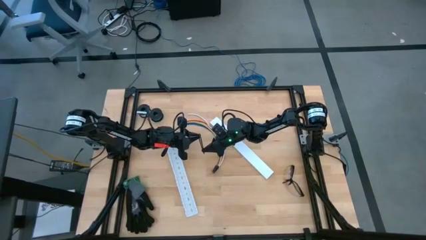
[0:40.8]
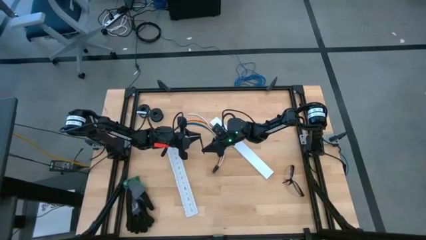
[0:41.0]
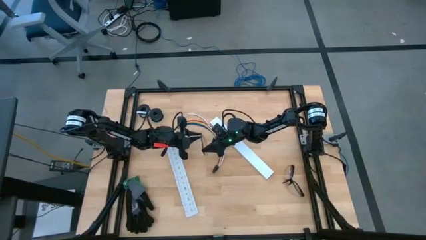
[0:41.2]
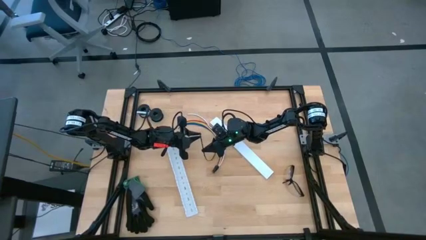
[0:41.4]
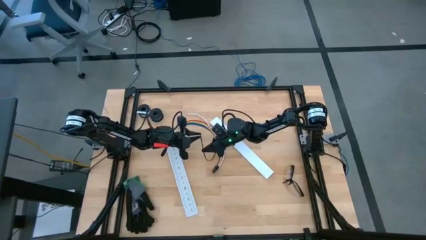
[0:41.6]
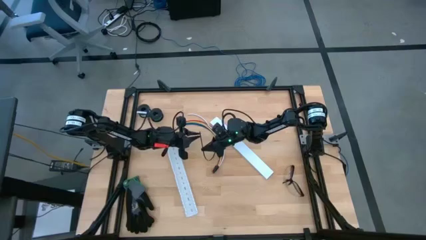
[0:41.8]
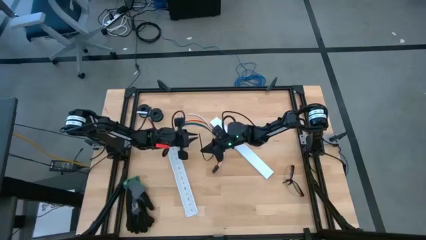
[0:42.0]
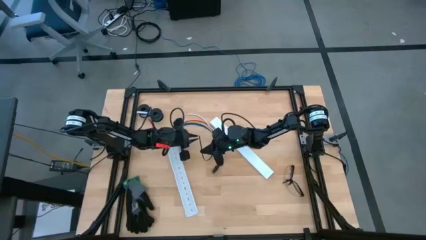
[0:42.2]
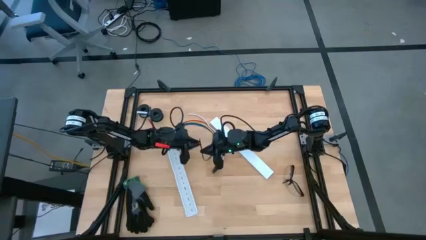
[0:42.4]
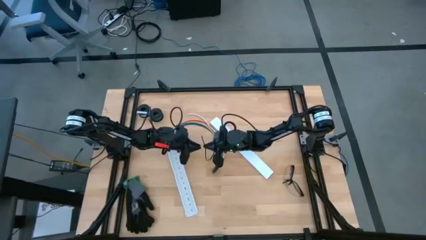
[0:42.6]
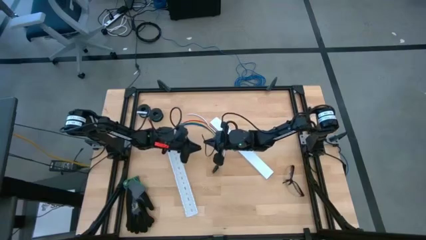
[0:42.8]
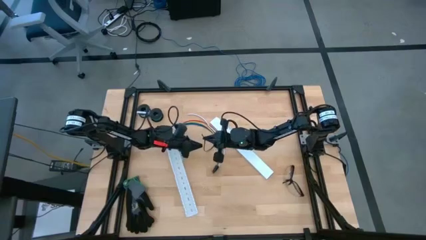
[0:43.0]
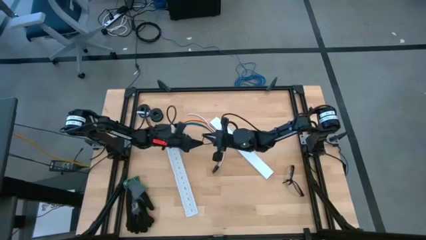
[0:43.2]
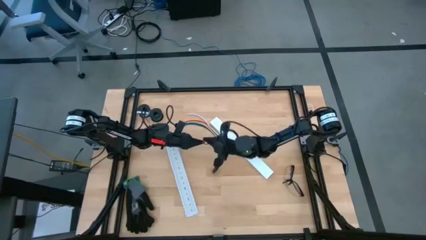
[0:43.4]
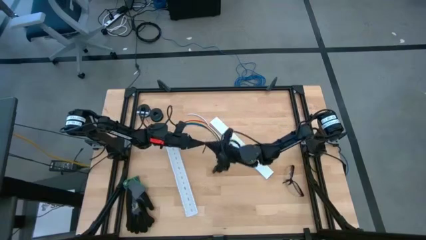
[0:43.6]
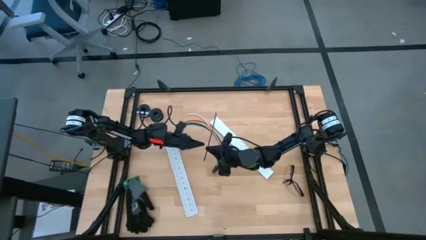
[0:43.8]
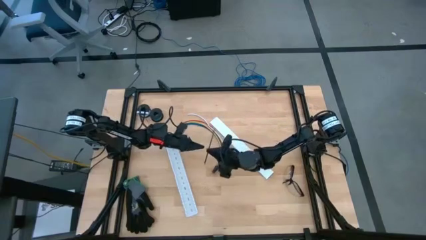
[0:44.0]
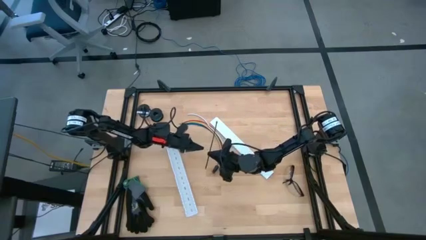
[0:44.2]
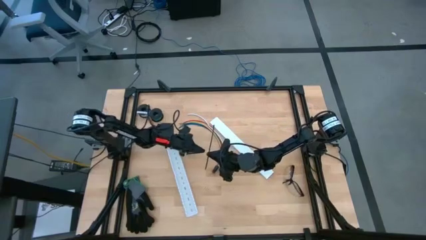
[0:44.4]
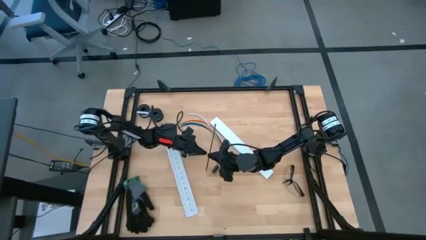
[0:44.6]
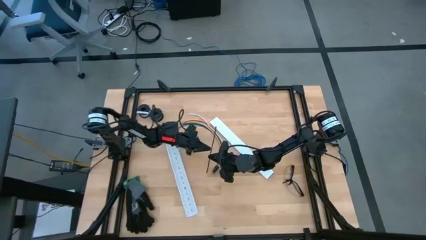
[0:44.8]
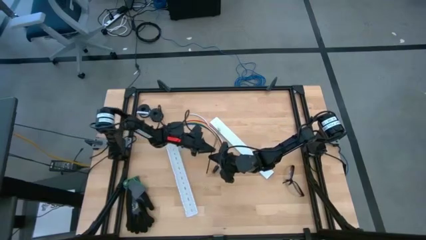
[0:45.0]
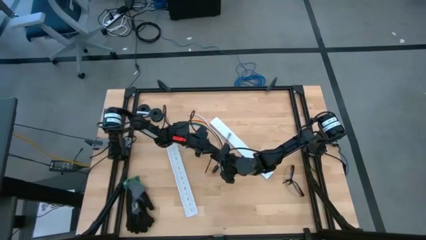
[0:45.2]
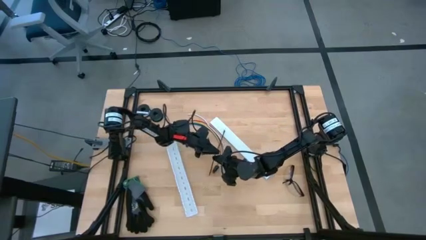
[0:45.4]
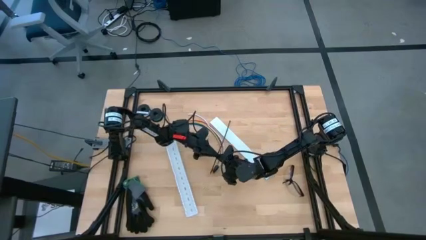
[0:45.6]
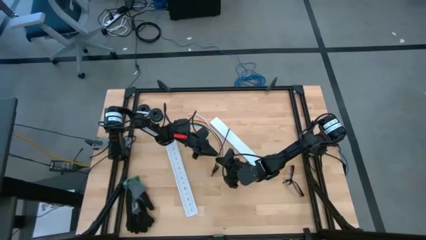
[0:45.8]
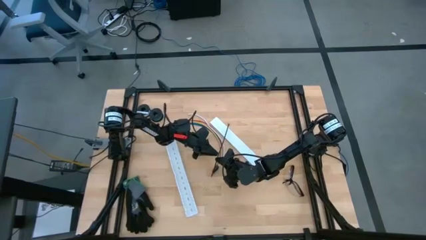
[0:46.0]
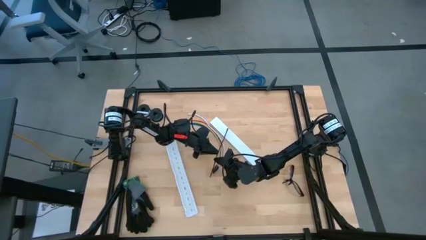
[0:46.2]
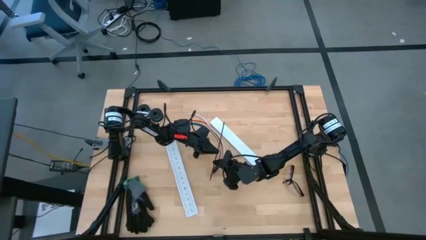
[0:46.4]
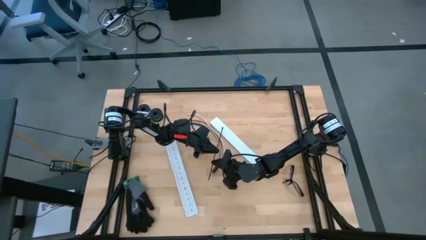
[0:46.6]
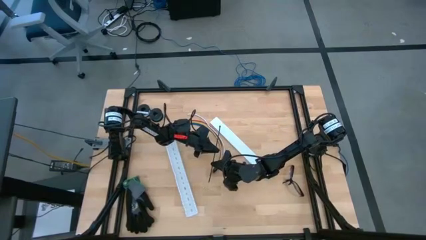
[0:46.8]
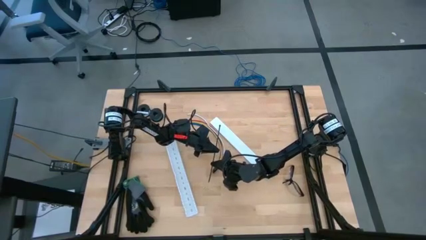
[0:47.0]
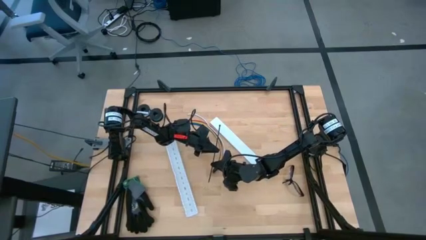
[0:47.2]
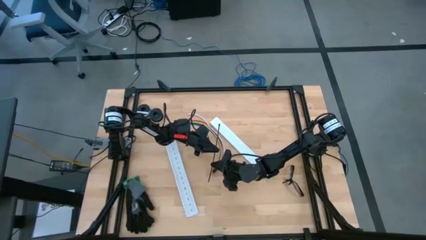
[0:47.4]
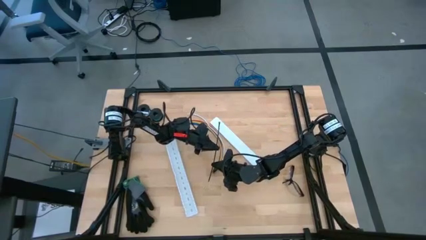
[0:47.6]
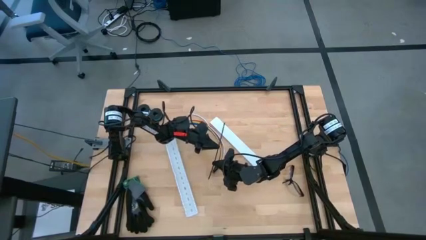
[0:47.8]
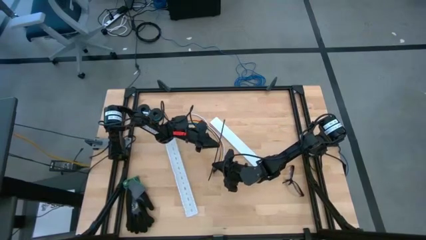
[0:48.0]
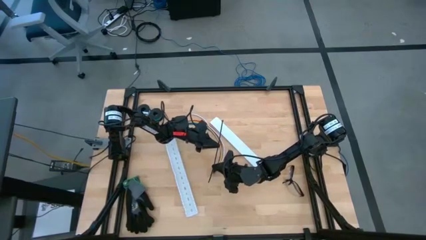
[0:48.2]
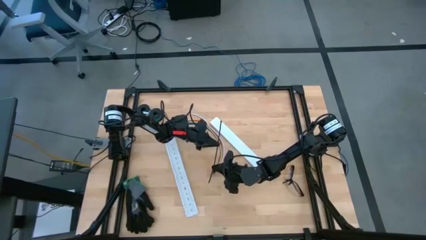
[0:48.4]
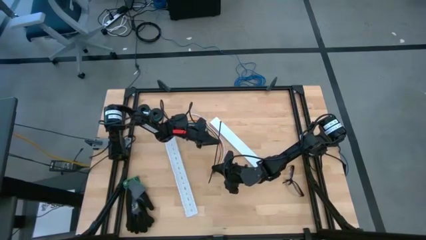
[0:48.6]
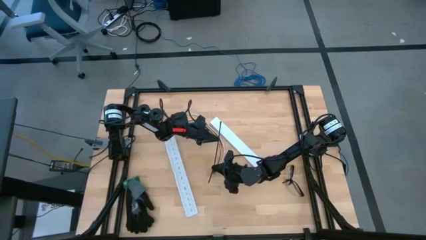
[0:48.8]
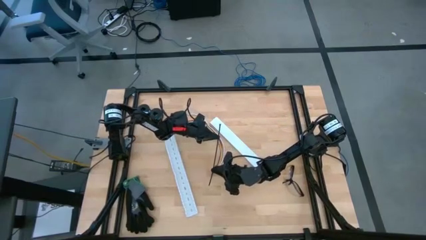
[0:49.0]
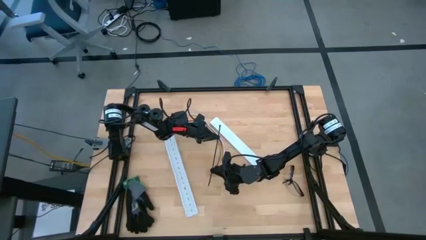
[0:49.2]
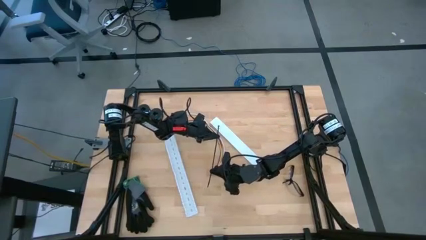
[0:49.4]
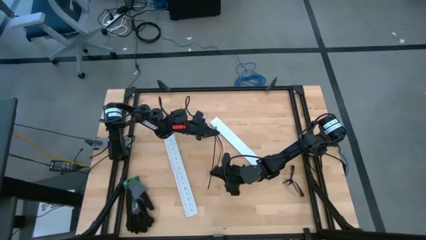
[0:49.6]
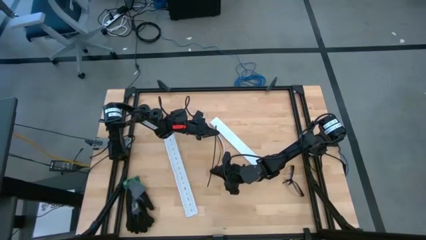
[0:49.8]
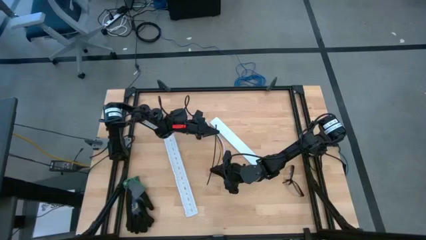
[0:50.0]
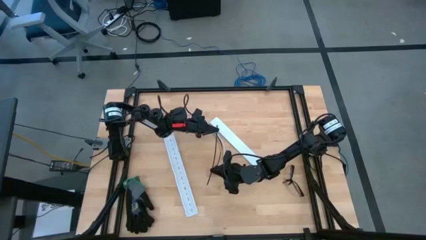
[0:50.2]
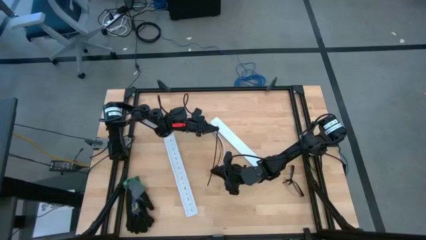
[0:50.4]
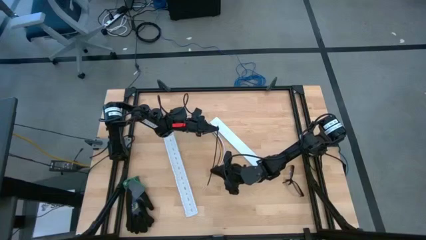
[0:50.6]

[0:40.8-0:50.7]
Task: Ziptie cables
Wrap the cables together using the black zip tie

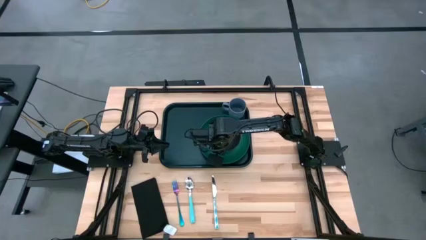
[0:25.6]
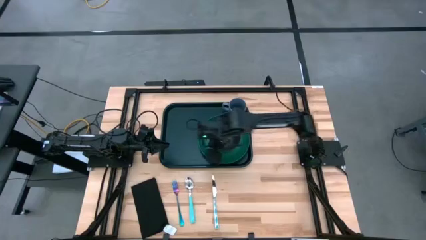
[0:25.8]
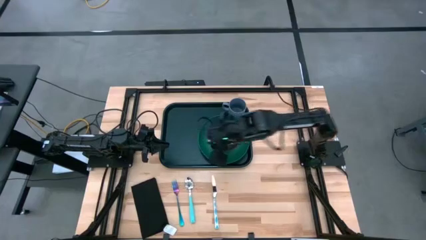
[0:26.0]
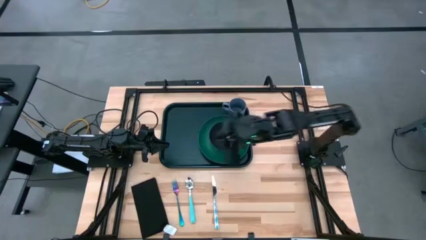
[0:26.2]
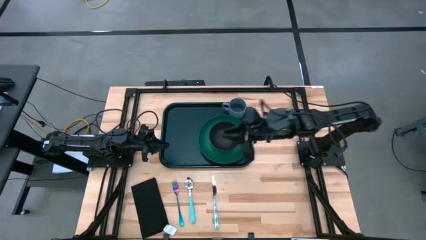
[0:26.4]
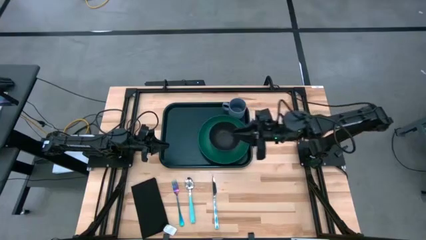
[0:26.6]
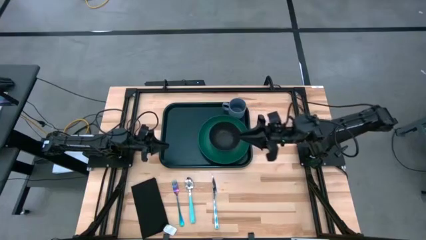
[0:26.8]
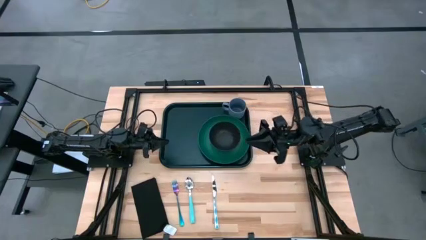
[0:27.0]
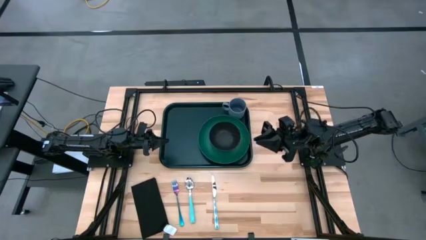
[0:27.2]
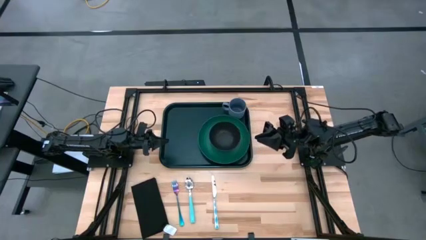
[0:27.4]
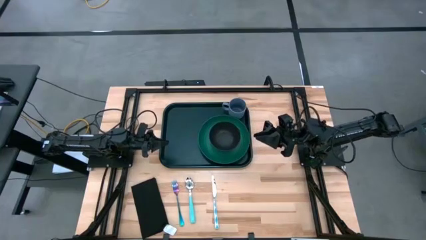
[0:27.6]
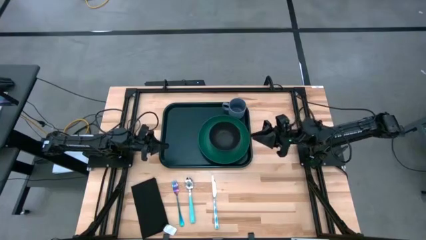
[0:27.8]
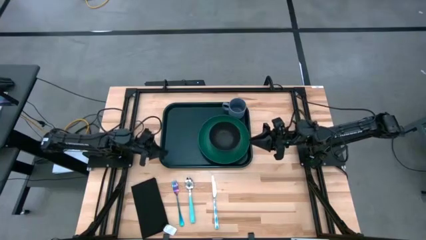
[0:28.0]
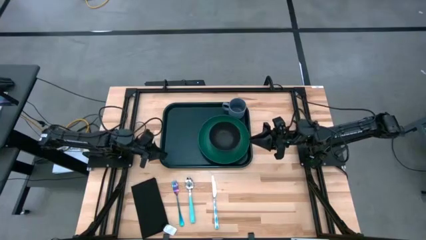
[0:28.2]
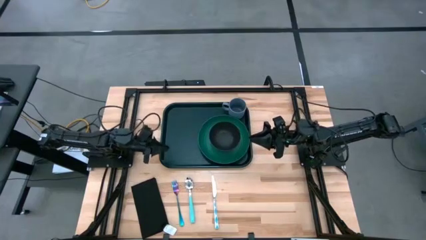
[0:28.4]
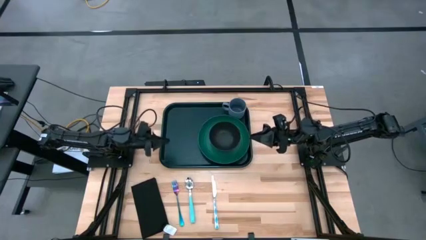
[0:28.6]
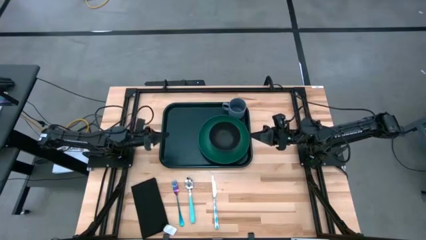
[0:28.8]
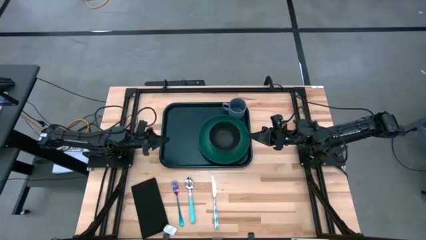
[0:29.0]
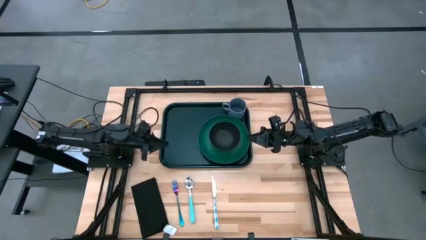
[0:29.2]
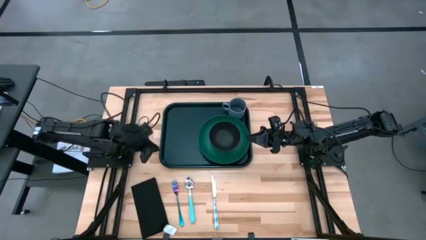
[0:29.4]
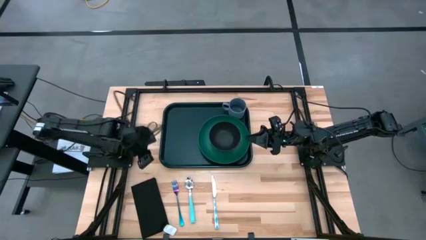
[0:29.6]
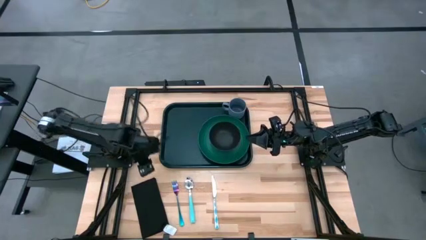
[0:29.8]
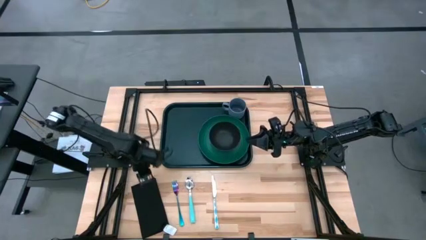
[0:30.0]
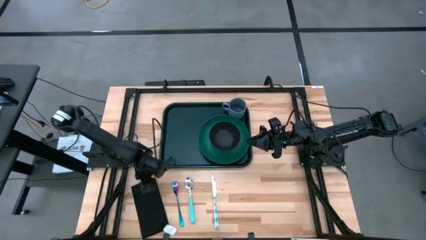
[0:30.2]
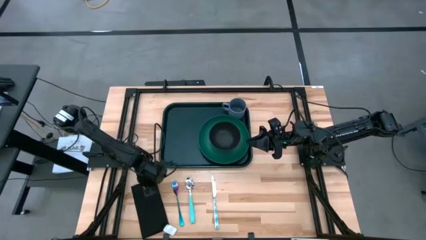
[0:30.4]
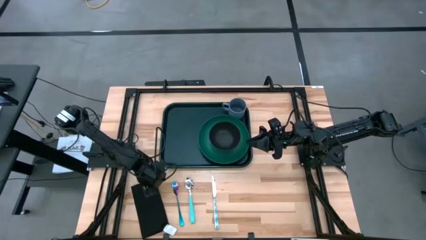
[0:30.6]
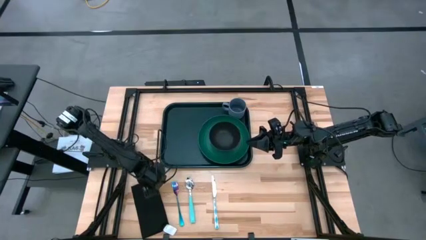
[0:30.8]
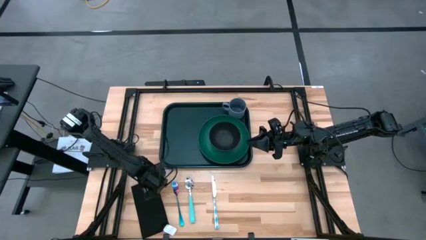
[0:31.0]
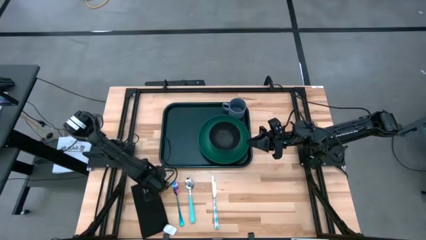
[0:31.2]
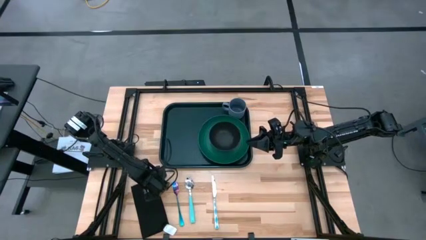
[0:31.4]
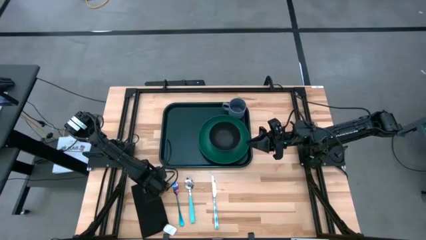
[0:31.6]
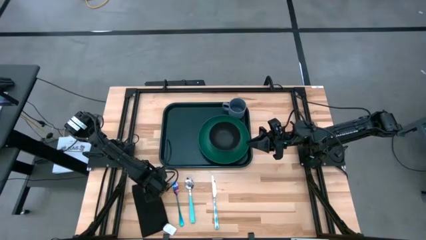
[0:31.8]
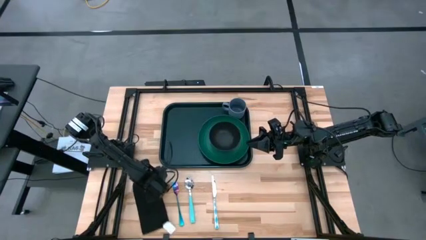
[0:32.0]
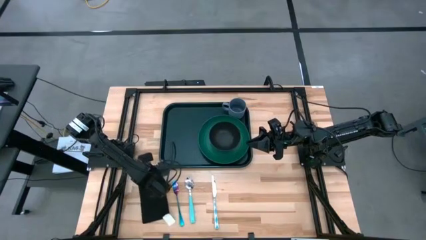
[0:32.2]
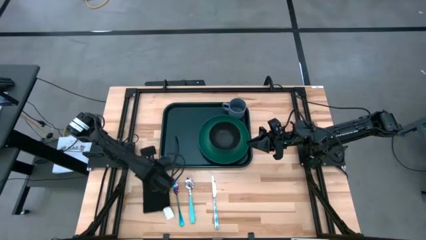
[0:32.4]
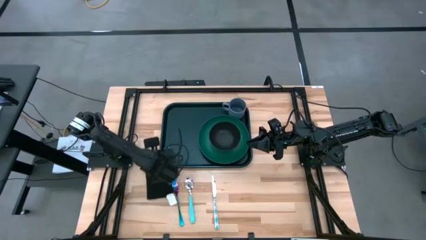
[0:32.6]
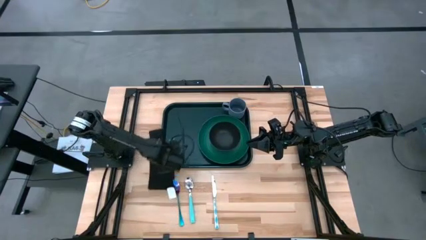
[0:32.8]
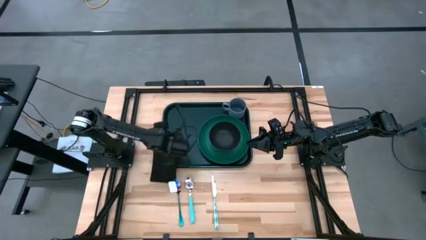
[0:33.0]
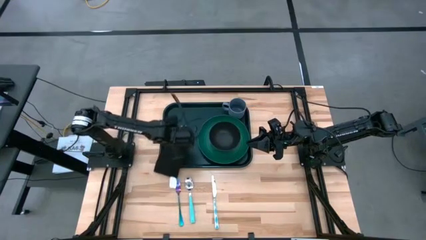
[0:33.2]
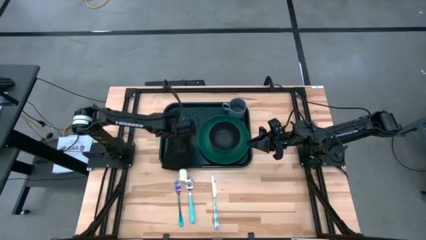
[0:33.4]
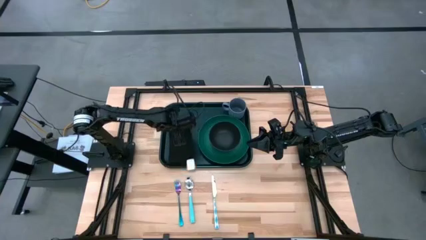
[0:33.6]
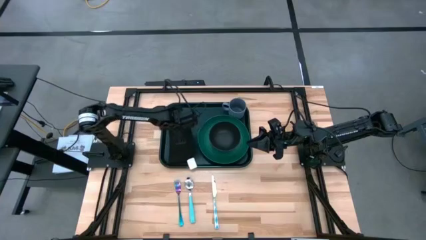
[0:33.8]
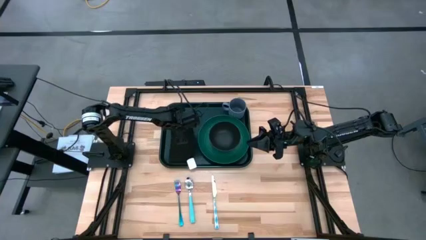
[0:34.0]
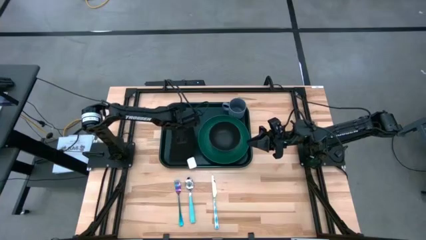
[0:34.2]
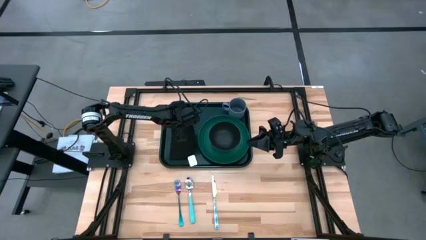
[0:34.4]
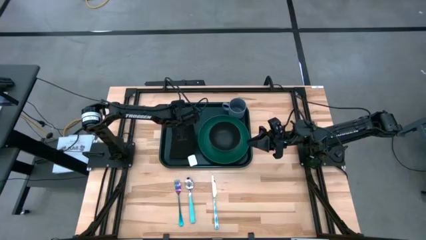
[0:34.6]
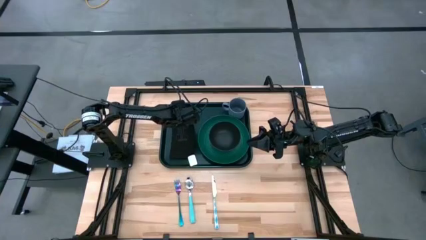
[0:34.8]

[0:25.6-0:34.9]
Task: Set up tray
Put the black napkin on the black tray to the left of the green plate
